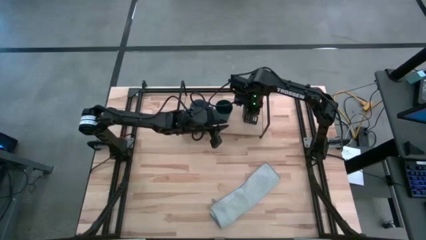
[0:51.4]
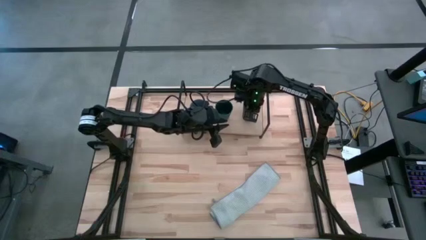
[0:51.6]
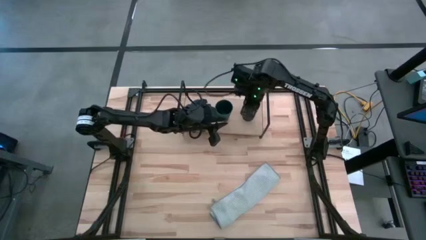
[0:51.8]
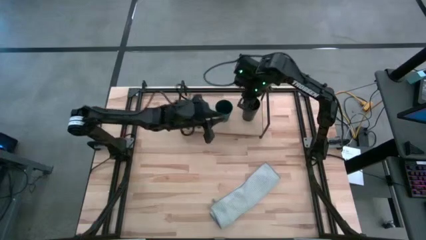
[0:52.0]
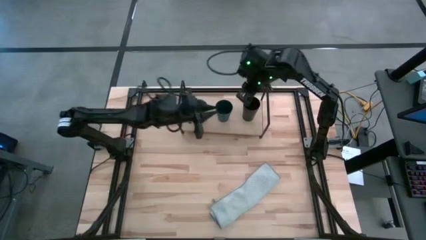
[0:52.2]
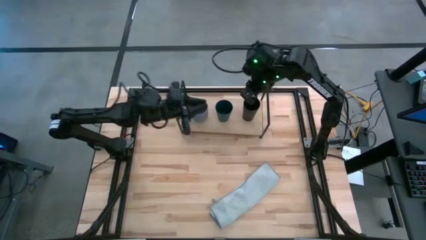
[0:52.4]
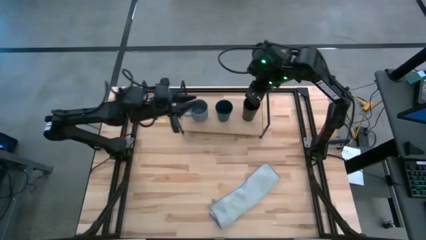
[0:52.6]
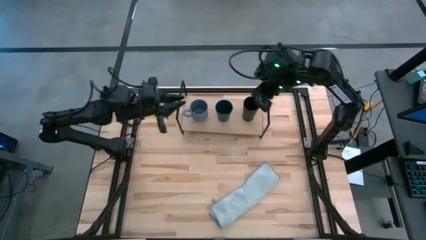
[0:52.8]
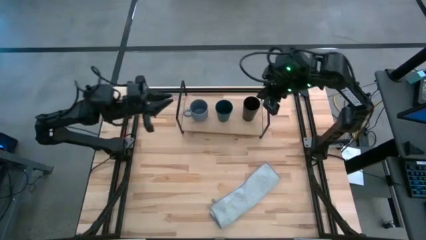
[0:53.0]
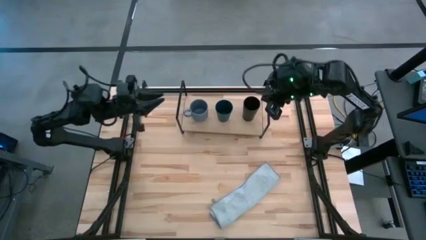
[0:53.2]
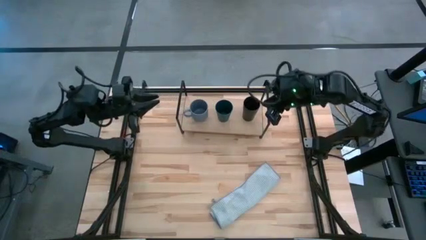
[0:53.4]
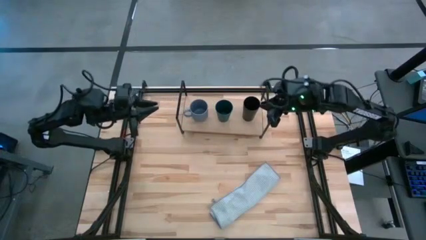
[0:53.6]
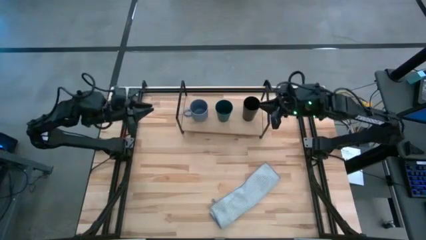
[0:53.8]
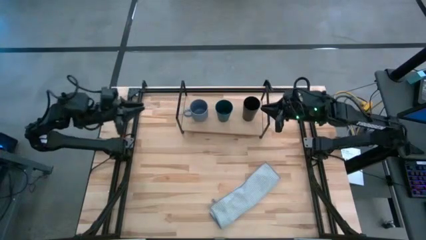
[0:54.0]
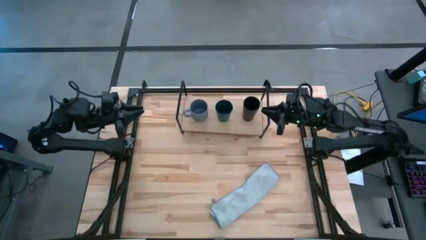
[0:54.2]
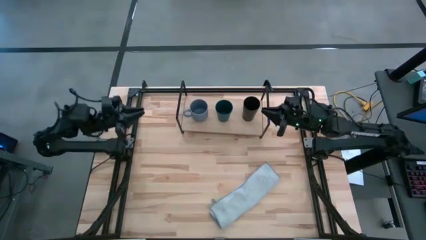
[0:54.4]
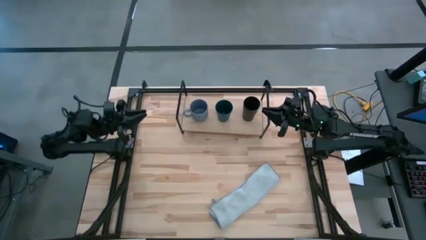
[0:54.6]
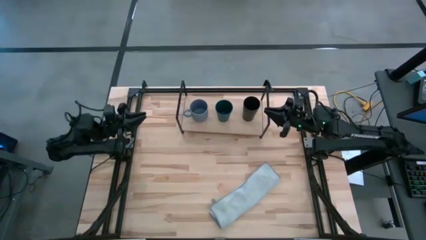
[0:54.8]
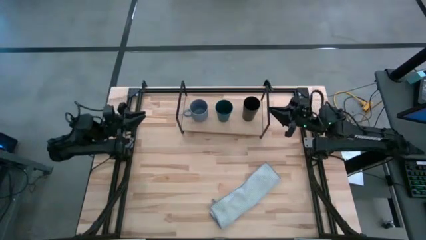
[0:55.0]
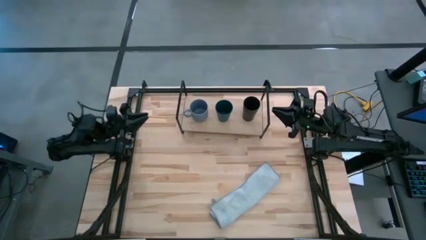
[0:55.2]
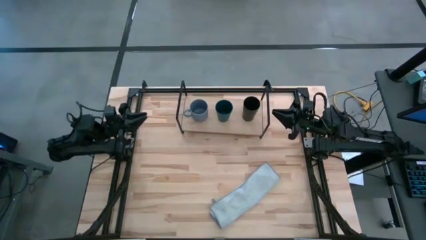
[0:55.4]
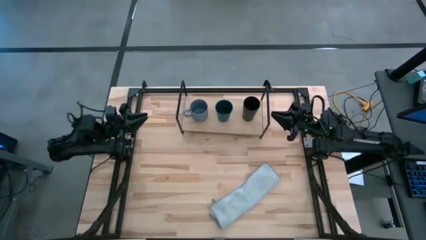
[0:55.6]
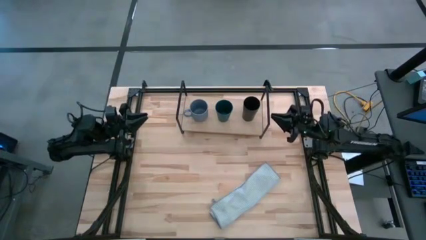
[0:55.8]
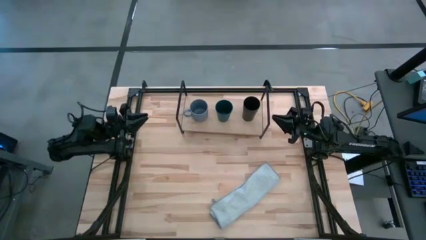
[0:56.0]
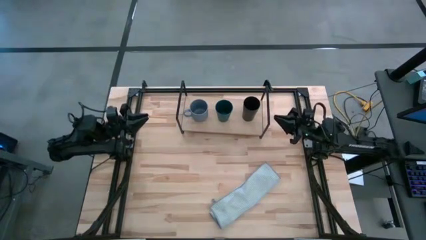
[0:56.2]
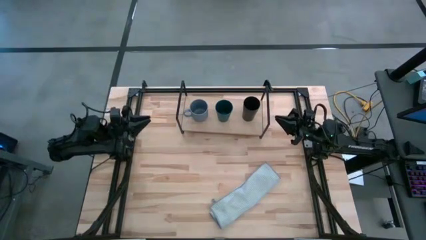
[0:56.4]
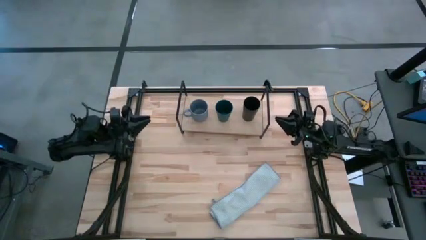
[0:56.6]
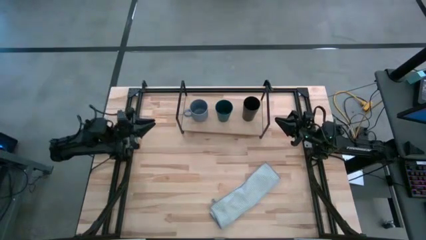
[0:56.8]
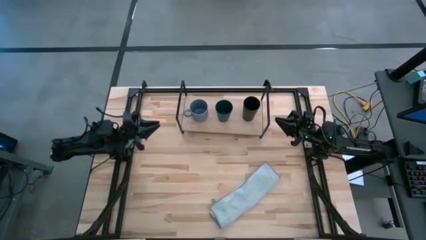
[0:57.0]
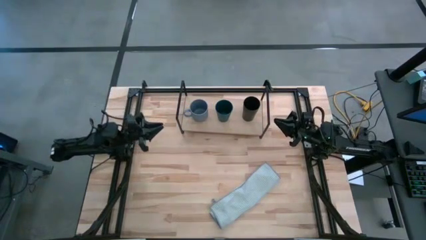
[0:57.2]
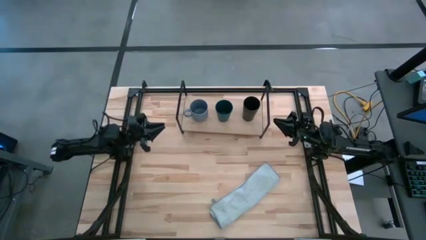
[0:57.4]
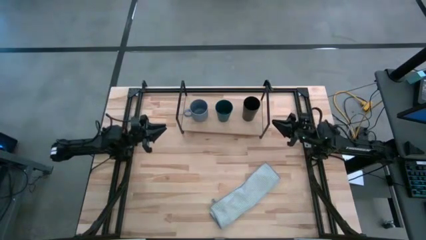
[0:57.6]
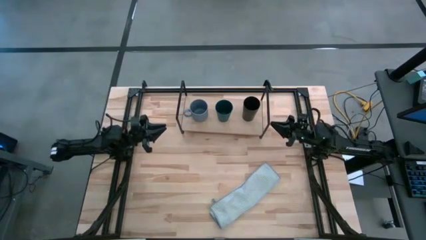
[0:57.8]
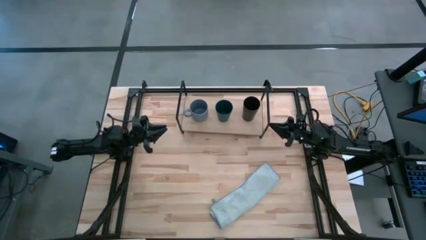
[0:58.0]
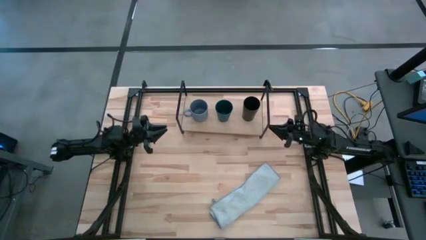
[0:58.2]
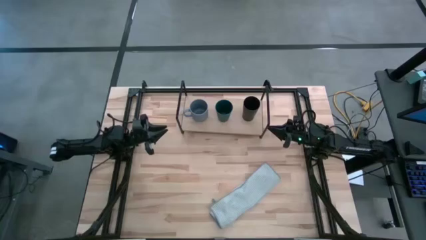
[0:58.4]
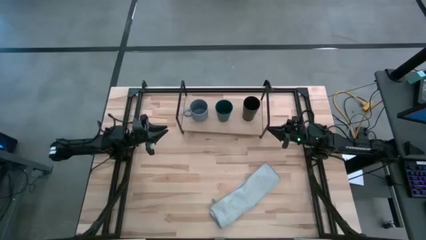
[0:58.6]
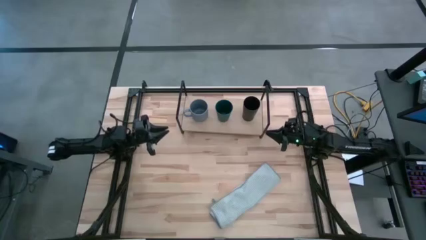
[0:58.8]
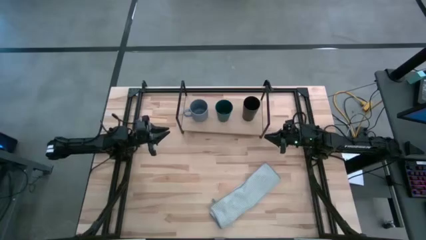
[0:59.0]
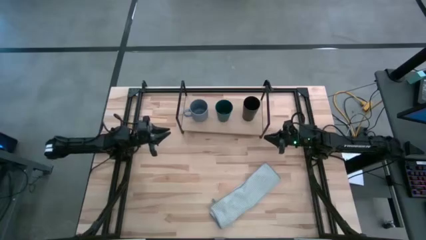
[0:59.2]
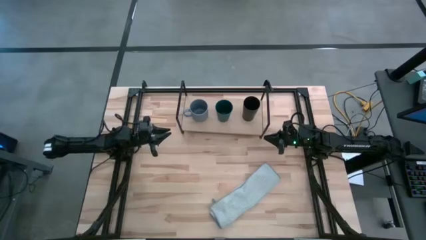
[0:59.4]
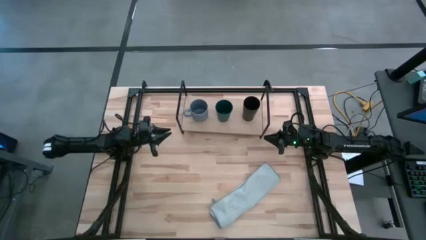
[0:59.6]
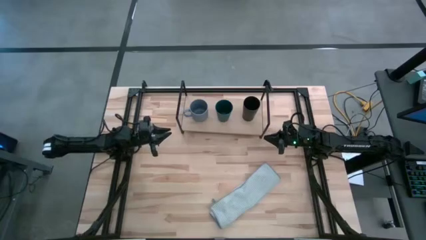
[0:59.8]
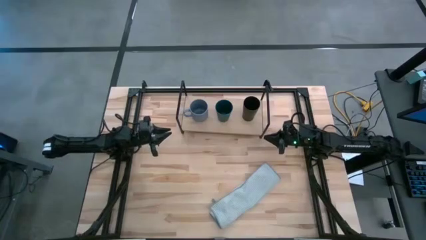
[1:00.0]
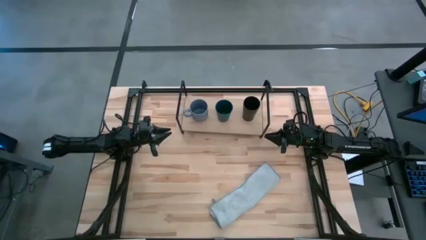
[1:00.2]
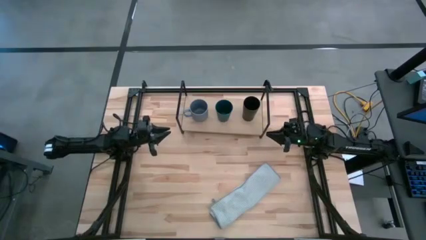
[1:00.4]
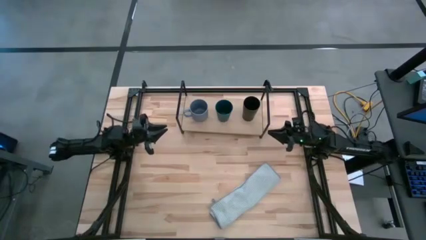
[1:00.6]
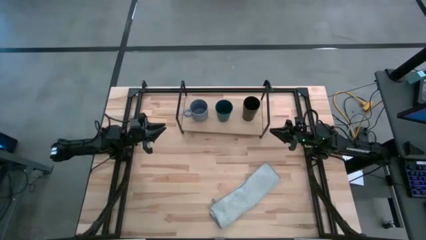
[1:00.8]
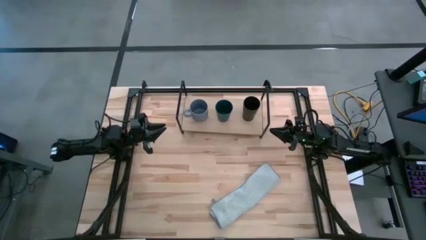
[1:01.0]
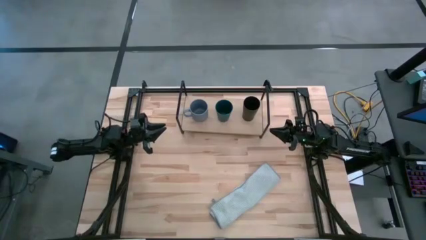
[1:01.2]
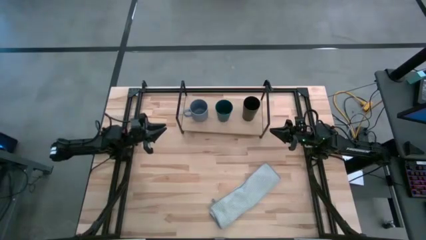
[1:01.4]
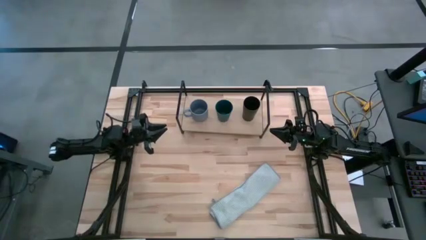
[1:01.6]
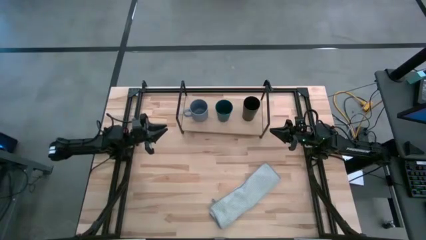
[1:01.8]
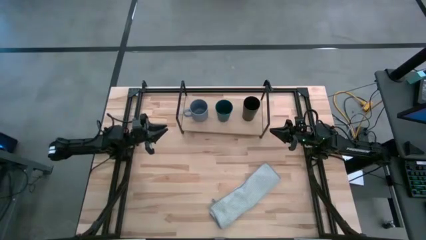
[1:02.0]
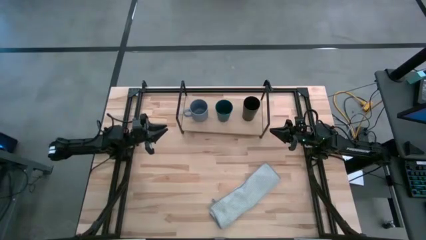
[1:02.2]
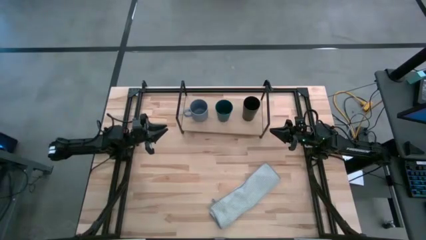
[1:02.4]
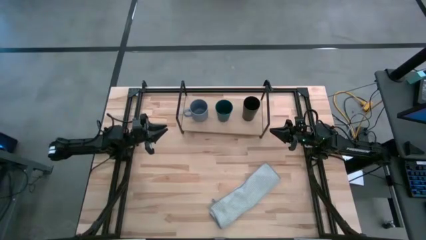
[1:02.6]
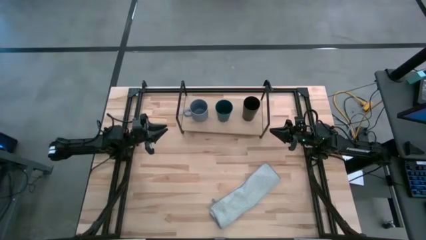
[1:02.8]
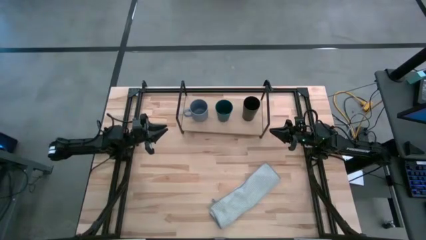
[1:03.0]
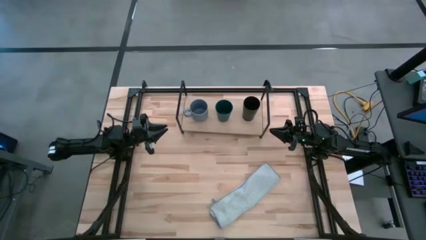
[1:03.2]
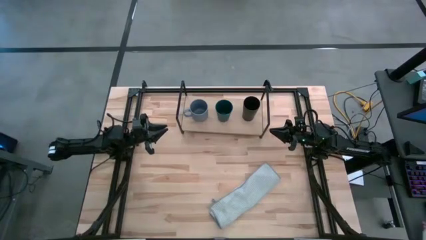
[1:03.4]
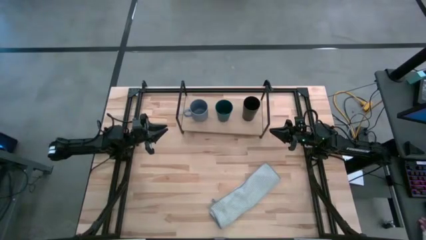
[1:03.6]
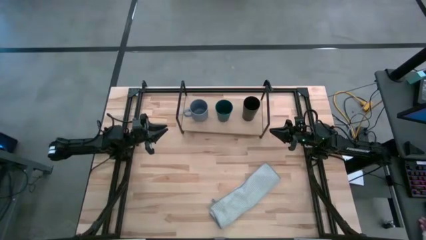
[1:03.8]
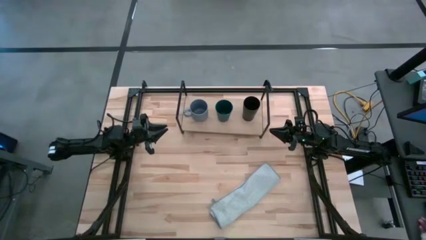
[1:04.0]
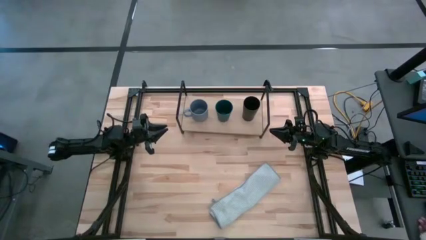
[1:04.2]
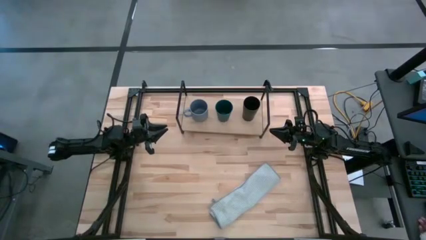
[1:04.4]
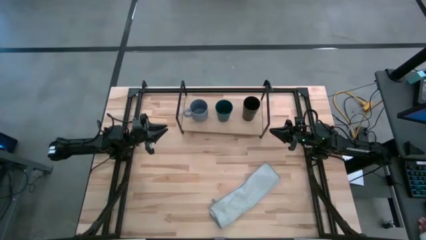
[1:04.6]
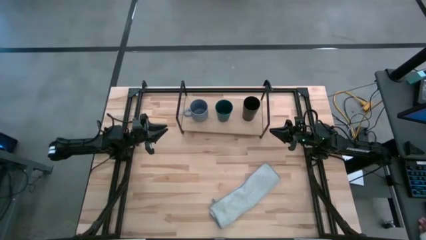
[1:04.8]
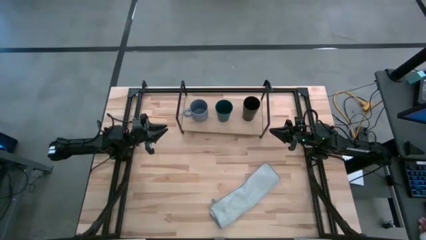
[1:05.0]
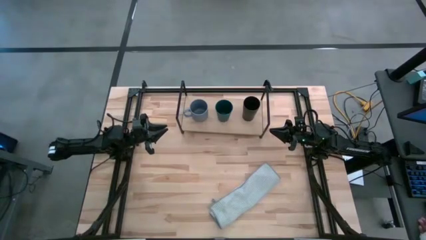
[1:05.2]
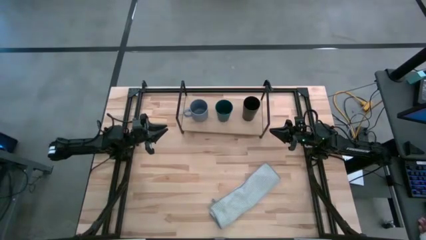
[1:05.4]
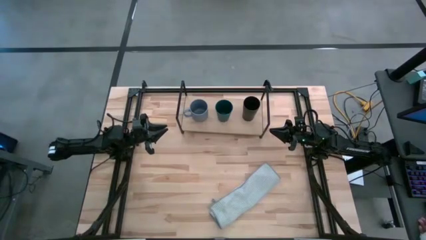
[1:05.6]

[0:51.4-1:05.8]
Task: Stack small to large cups/mugs on shelf
Return to Home Position

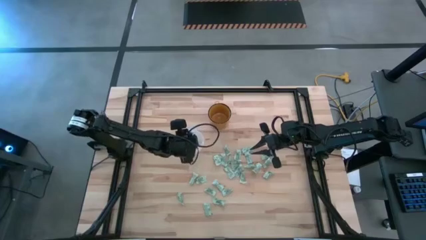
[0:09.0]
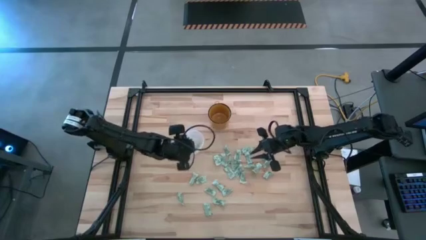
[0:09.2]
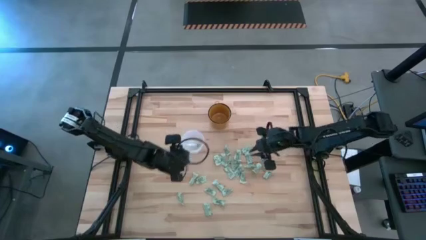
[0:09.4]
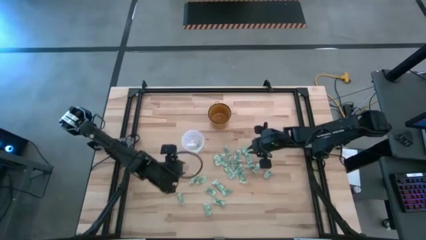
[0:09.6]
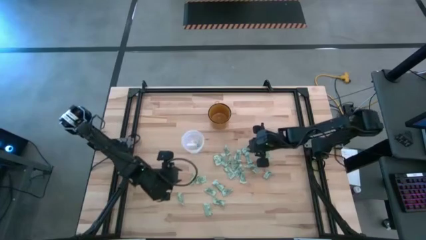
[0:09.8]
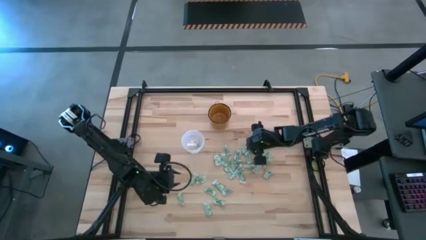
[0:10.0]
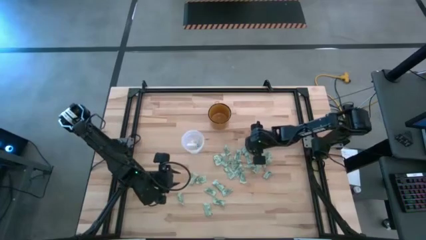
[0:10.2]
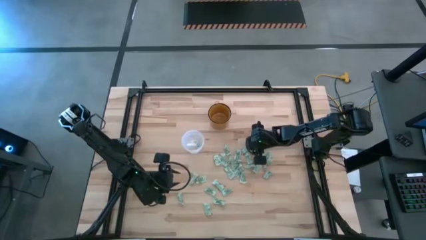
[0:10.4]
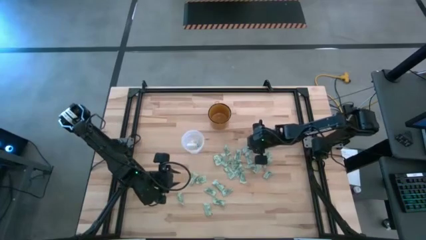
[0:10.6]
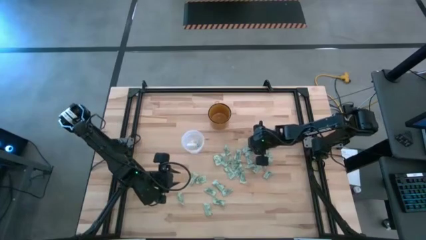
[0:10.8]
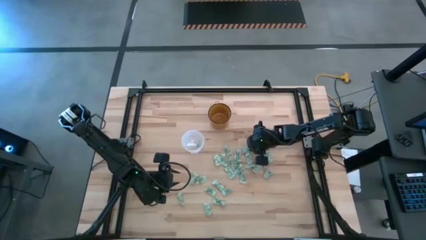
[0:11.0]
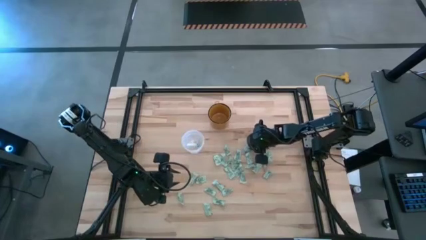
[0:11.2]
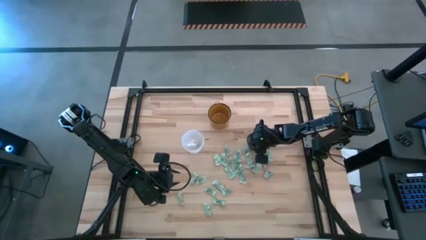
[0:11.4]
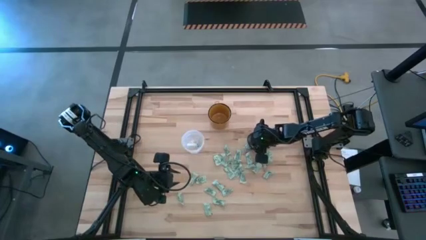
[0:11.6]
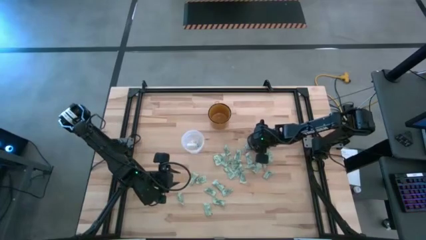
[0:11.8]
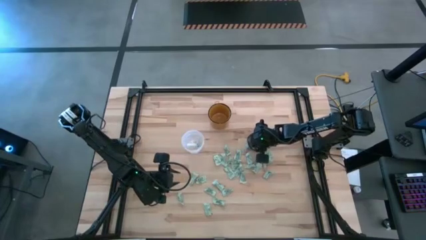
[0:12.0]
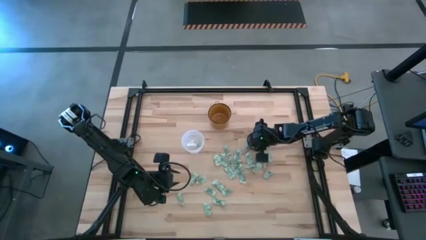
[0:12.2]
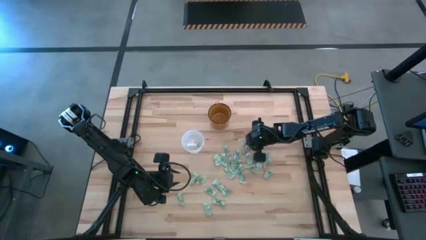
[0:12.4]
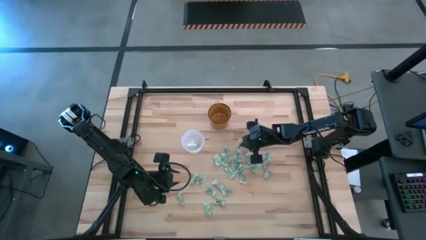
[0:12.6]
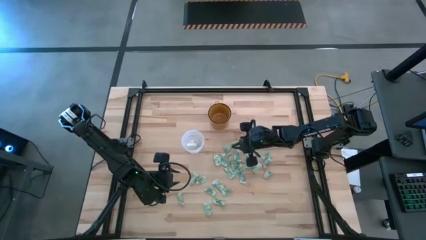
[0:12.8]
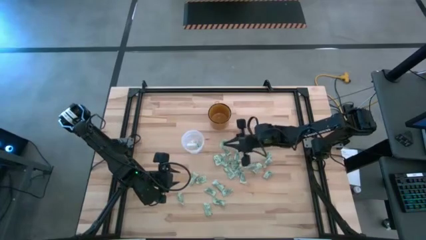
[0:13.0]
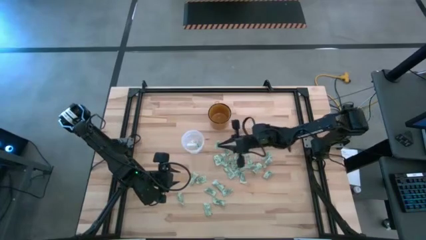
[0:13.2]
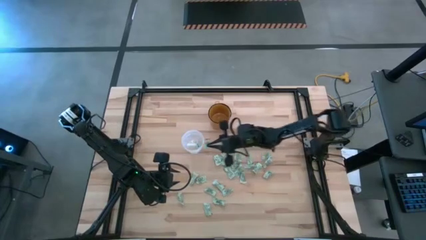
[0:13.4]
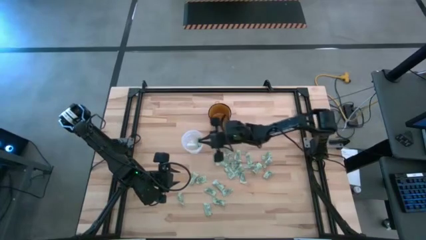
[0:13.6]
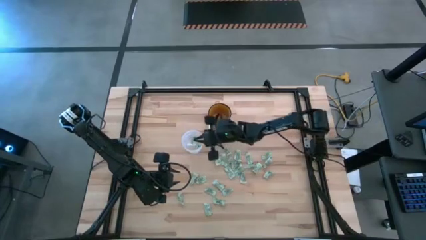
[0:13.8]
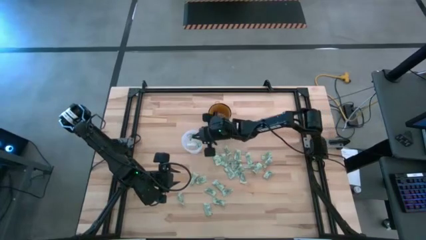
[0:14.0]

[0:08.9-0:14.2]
Task: Pick and place Stevia / Truvia into bins
Put the stevia packet into the transparent bin
